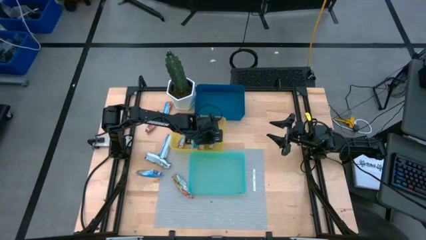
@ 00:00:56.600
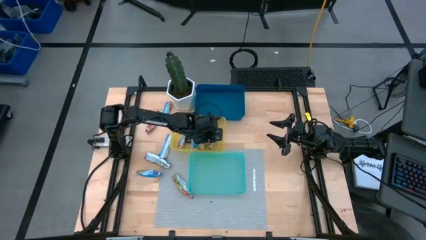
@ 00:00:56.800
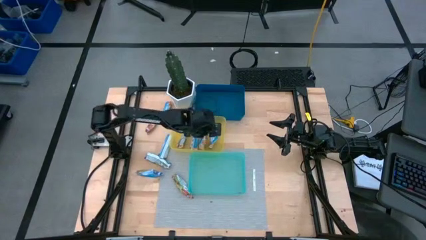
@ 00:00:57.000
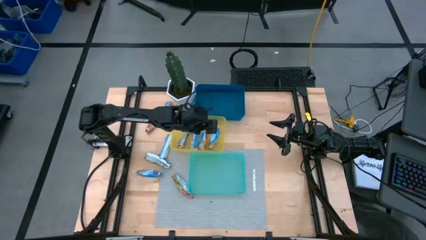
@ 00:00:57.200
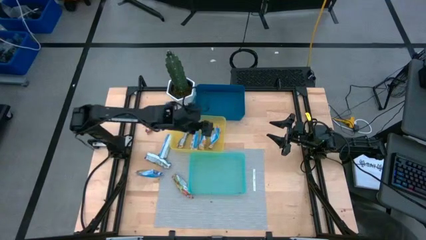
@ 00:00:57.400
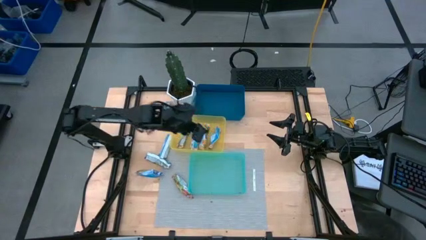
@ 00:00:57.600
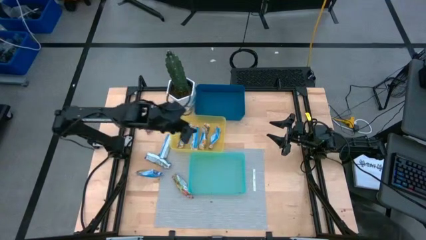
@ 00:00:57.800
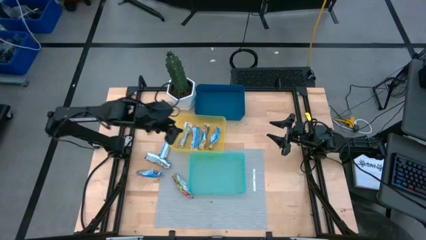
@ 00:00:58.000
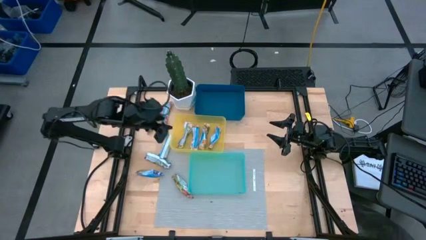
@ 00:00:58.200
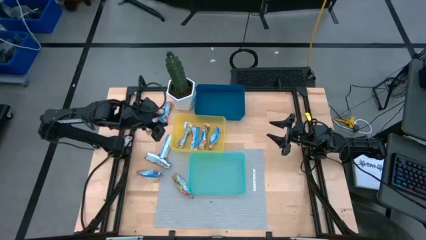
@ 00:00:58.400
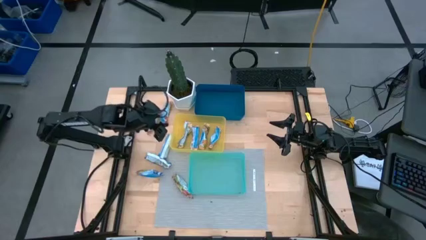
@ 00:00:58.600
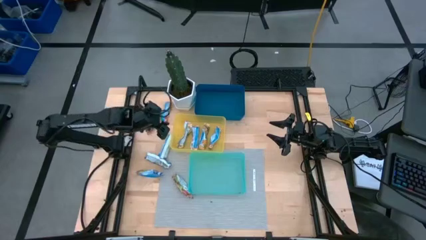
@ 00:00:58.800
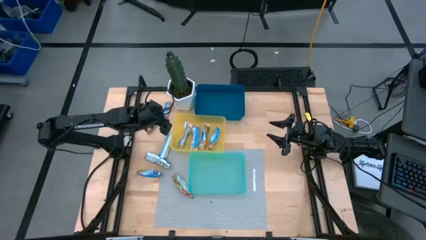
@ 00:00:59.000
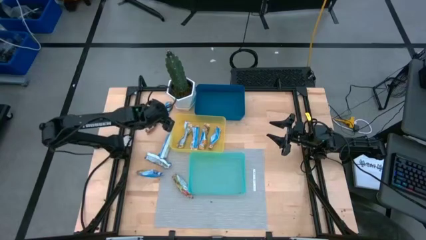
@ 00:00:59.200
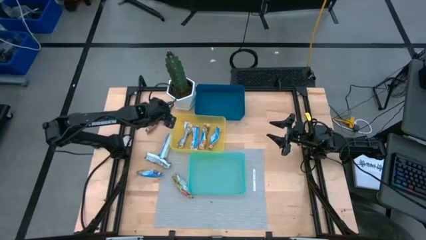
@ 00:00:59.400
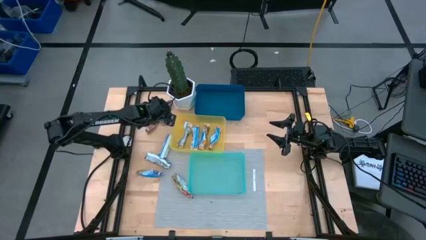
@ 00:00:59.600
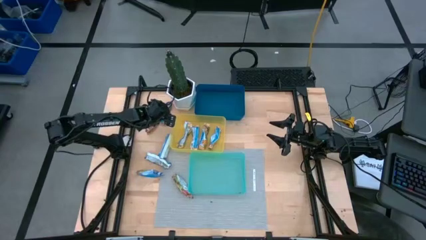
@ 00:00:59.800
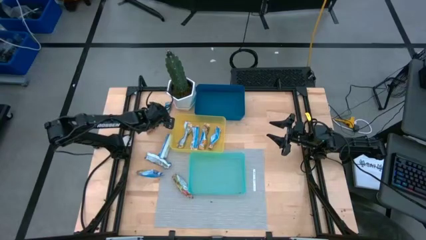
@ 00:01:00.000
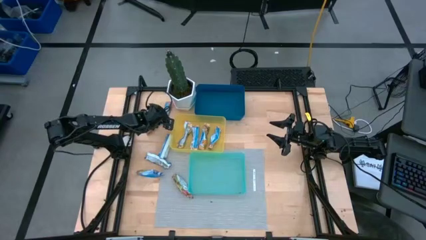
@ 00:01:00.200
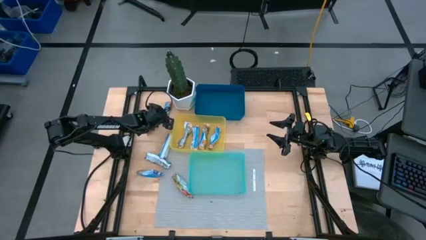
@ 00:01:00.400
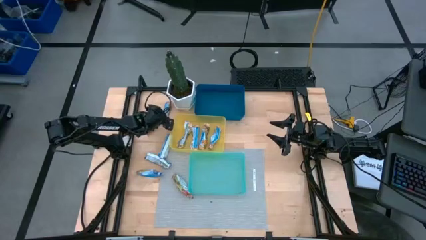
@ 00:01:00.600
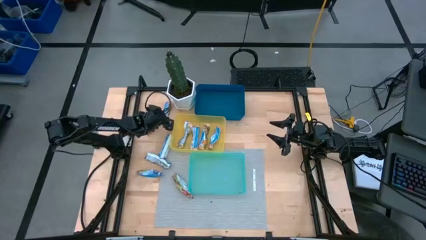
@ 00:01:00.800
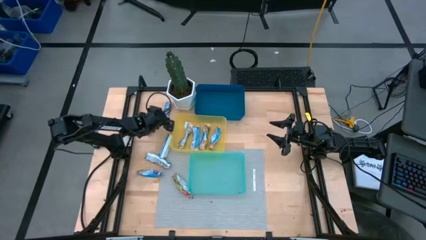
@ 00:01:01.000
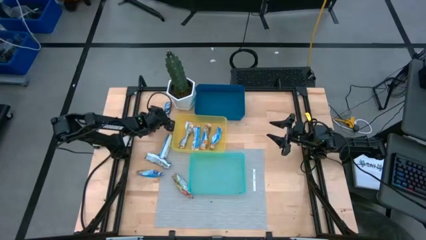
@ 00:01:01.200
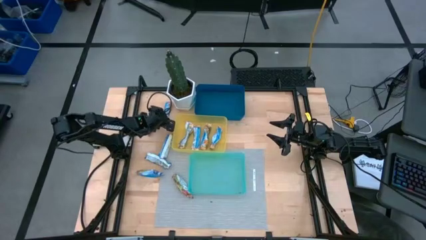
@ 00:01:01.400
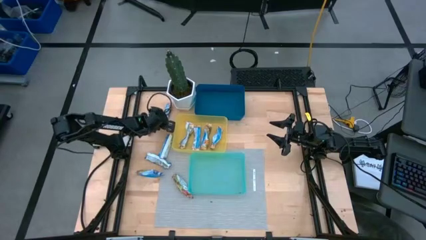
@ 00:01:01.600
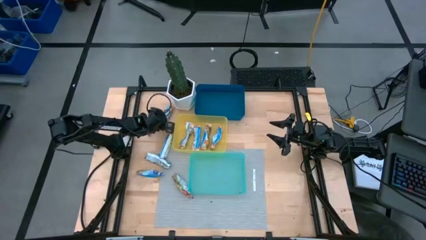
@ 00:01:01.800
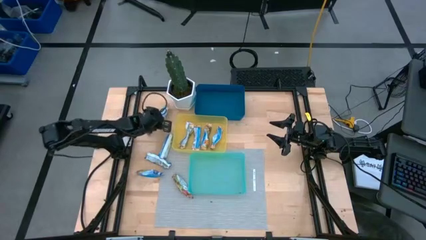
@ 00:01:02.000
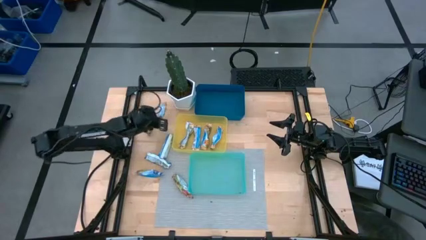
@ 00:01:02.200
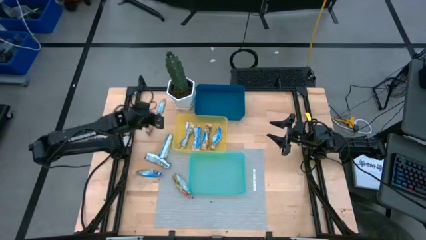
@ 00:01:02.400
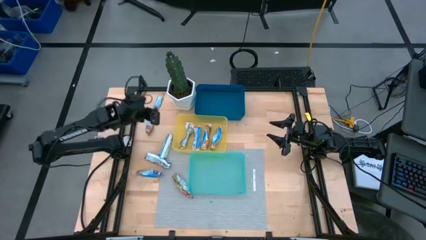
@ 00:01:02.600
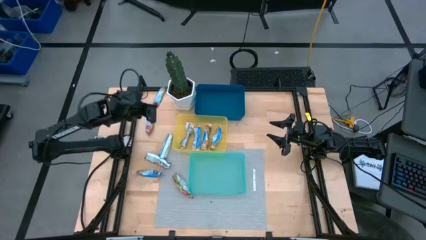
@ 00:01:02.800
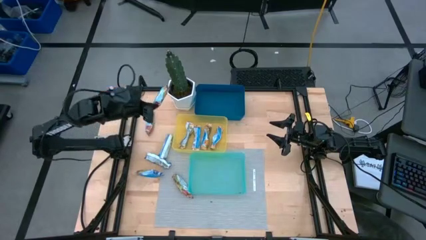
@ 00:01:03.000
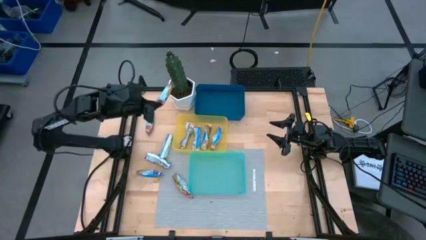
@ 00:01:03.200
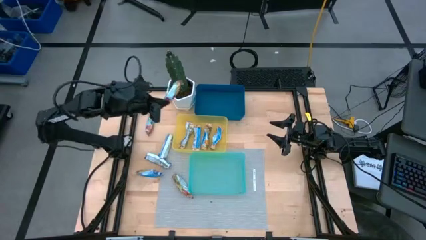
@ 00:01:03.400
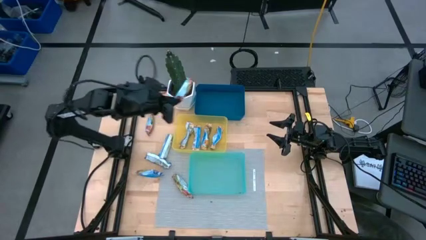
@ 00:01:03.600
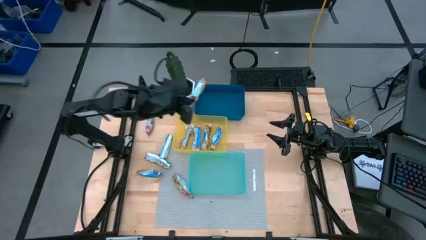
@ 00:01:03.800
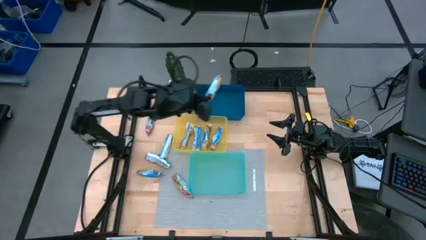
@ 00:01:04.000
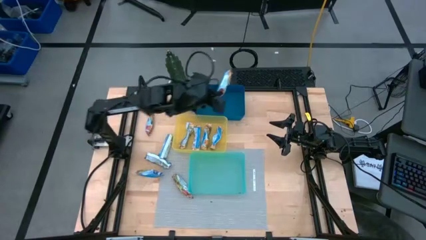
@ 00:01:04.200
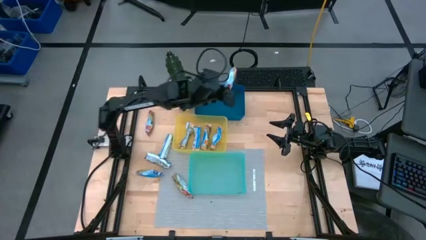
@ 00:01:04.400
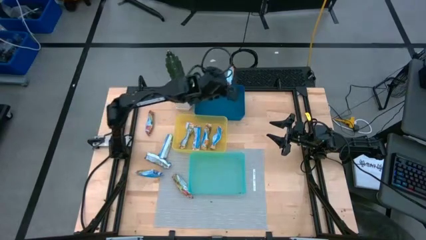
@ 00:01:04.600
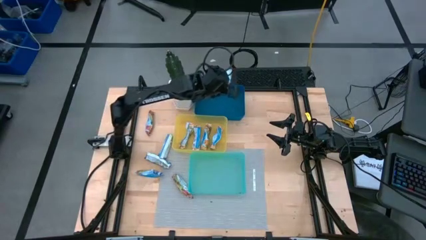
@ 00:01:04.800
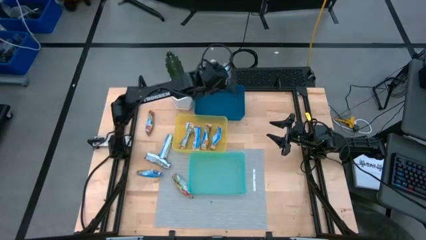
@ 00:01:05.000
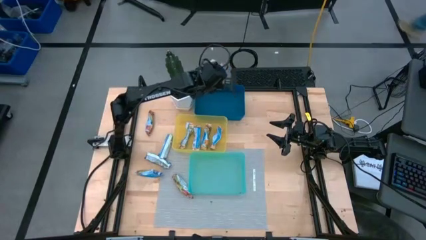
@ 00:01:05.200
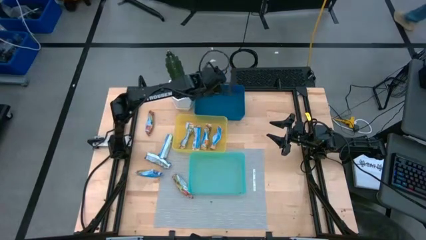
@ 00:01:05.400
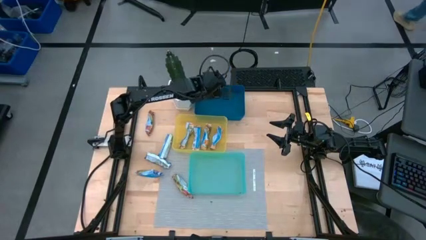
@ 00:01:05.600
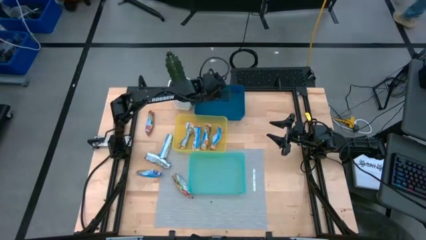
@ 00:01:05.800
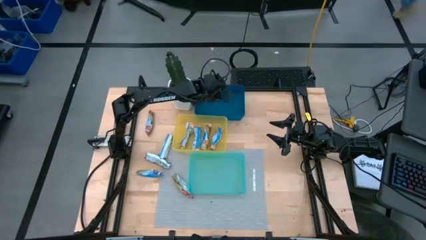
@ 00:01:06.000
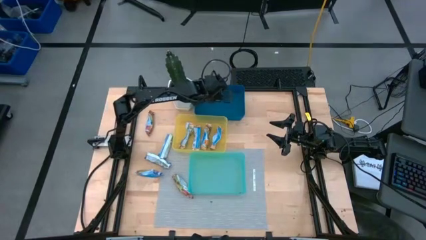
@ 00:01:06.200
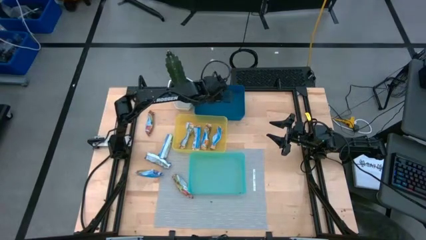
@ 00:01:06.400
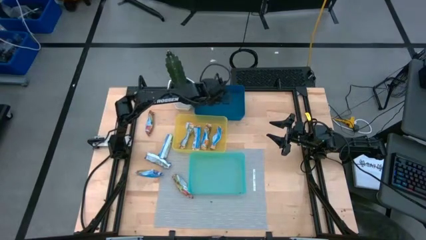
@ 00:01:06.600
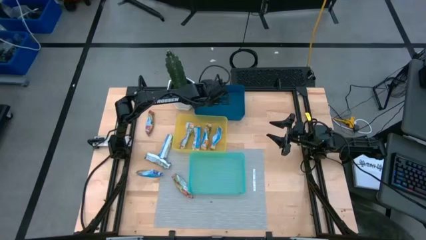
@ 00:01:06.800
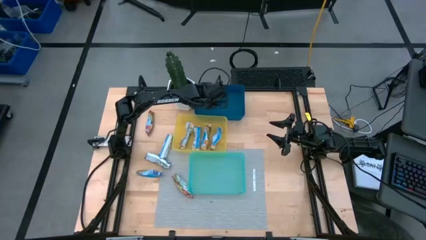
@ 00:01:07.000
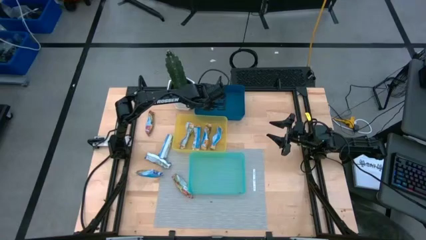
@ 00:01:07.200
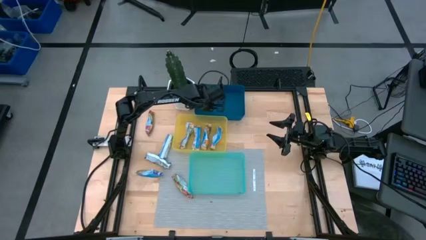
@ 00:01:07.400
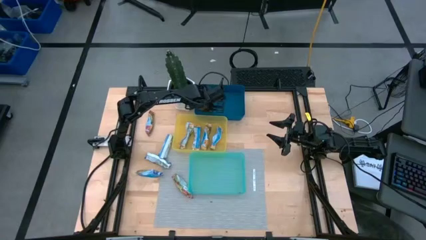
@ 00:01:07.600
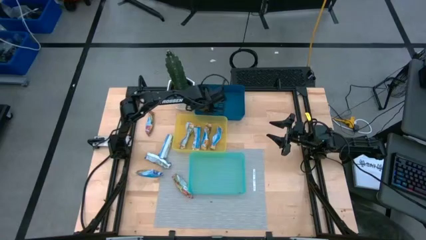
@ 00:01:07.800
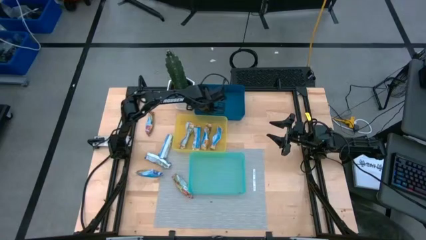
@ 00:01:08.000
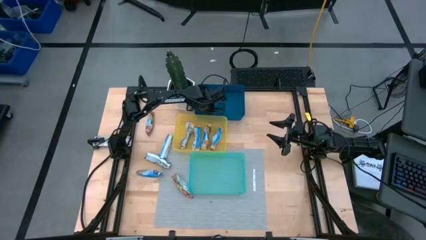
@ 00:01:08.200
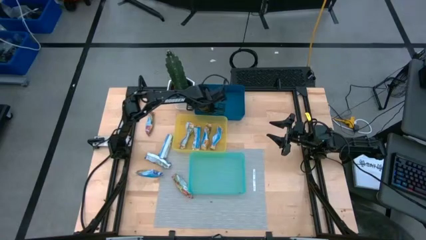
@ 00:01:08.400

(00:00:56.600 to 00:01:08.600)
Task: Pick and place Granola Bars by type
Put the red granola bar into the blue bin

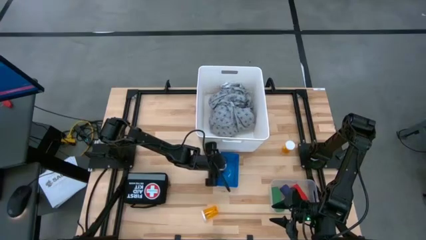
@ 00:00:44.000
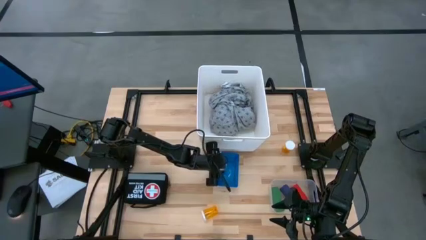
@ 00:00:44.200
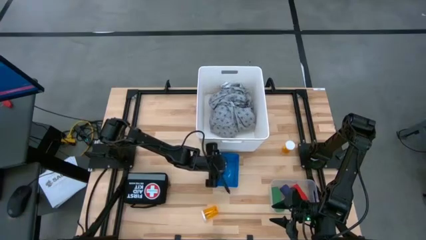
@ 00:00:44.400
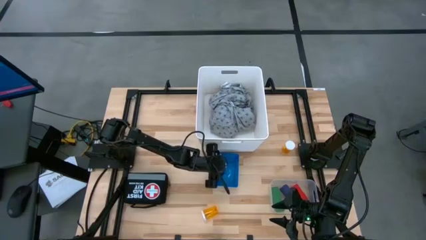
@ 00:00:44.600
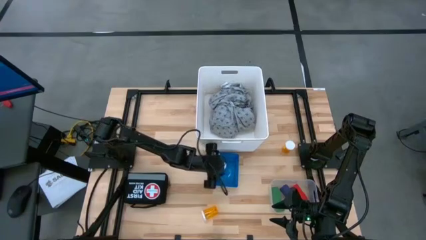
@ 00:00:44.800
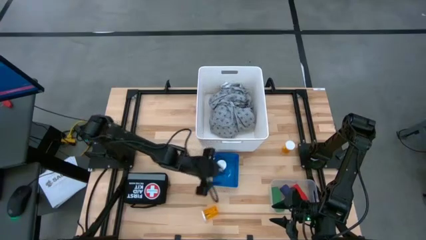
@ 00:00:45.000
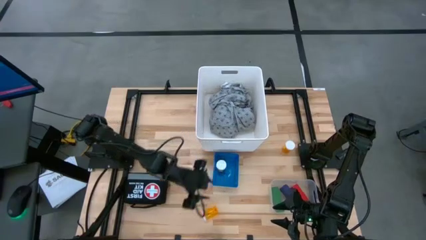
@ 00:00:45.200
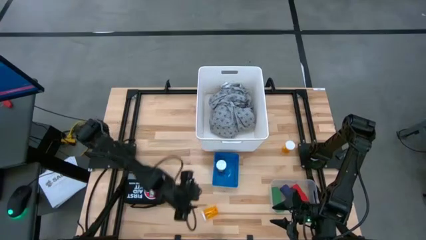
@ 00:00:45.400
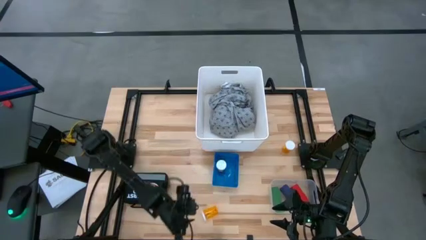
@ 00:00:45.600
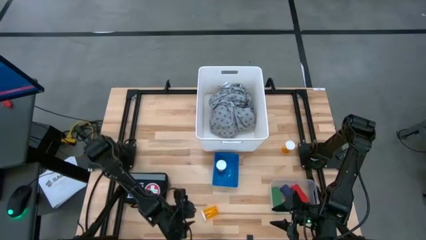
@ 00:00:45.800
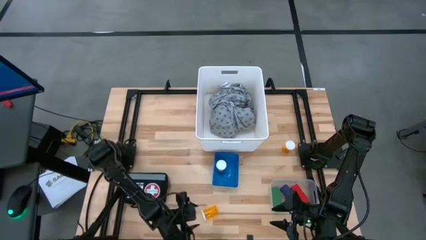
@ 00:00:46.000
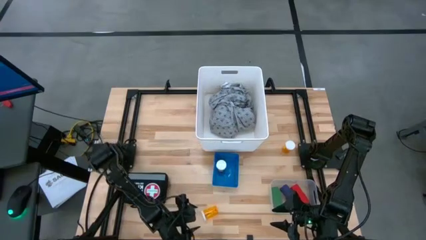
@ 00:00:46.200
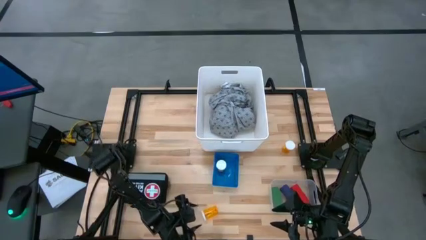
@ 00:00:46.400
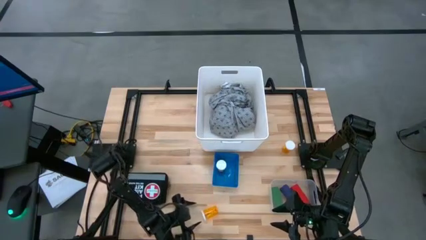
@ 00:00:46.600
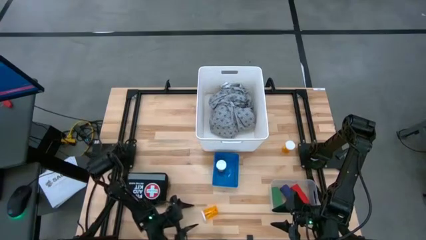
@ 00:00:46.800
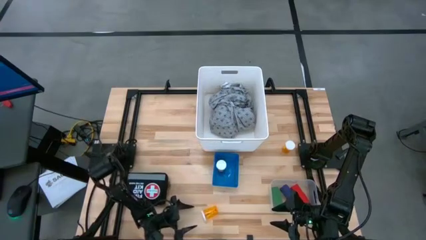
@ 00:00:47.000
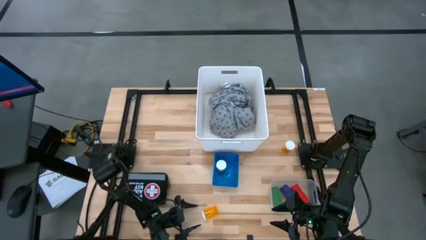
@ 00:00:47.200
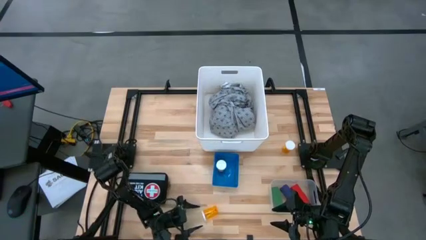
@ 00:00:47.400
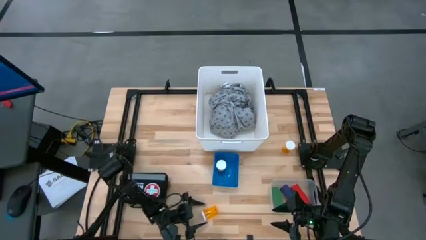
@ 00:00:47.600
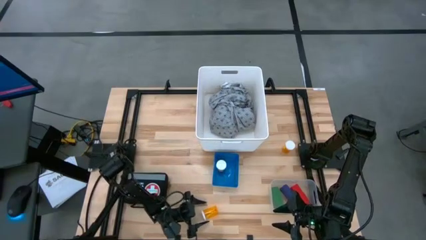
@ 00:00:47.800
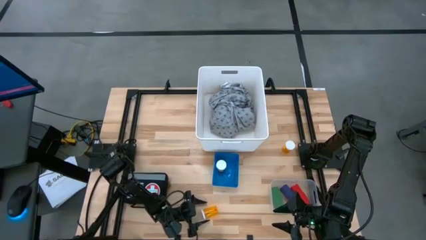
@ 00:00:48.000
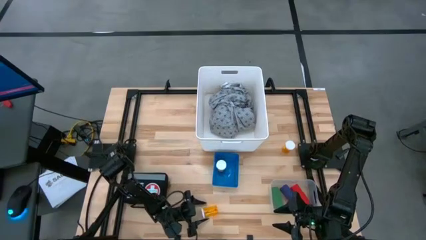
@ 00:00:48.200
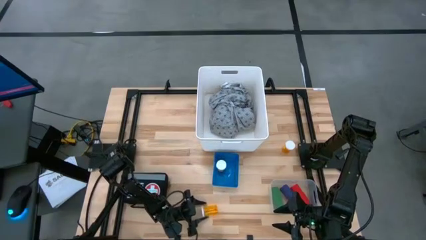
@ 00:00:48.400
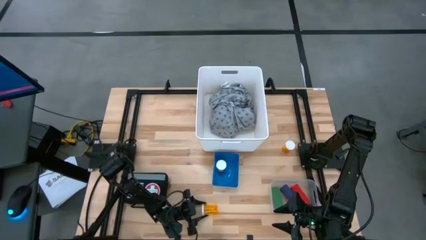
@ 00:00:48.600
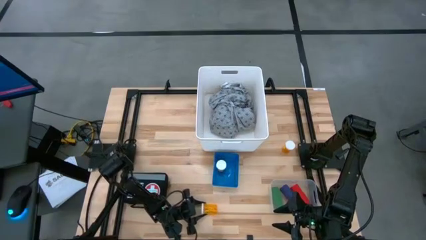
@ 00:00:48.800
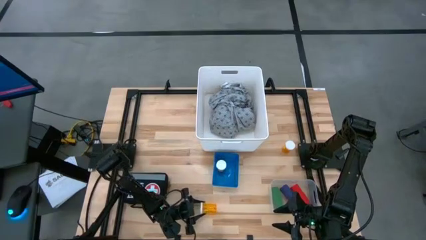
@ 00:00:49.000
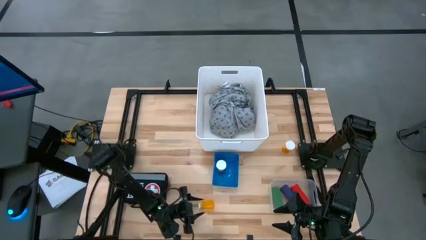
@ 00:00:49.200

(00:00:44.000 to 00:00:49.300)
Task: Pick & place medical supplies in basket/bin
Put the bottom yellow pill bottle into the blue bin
